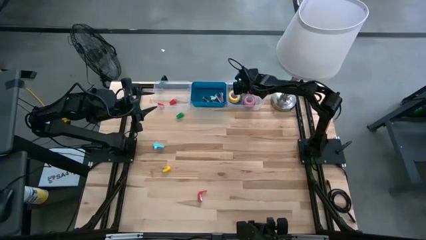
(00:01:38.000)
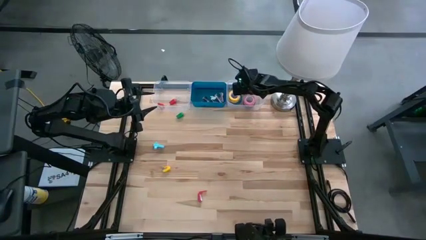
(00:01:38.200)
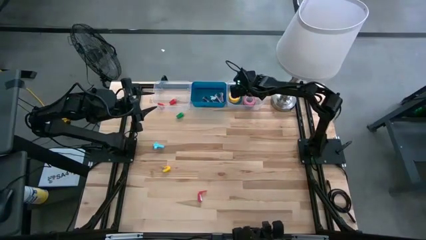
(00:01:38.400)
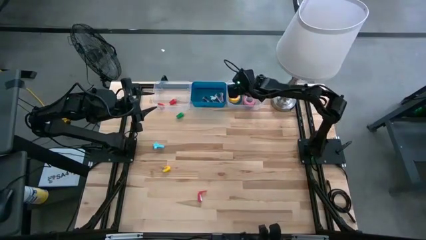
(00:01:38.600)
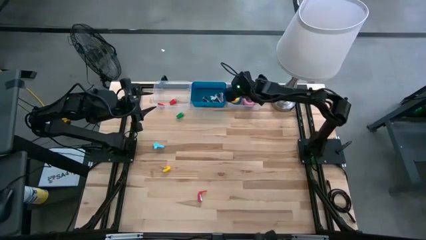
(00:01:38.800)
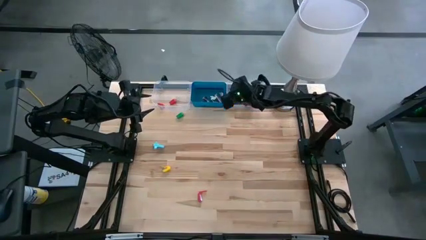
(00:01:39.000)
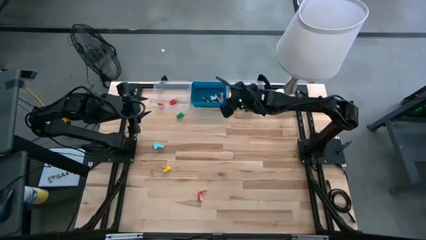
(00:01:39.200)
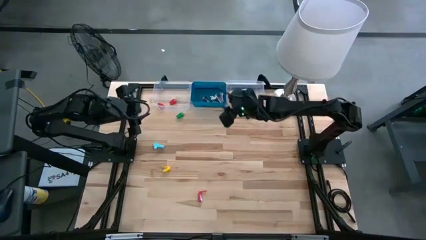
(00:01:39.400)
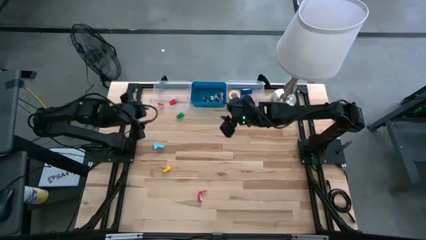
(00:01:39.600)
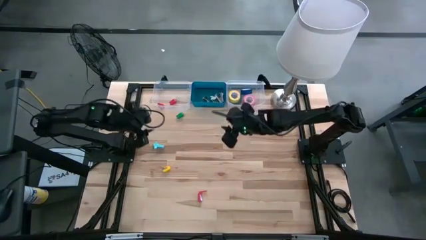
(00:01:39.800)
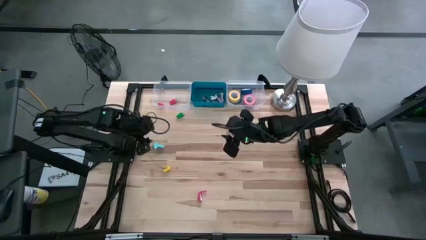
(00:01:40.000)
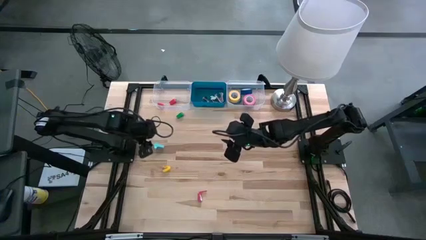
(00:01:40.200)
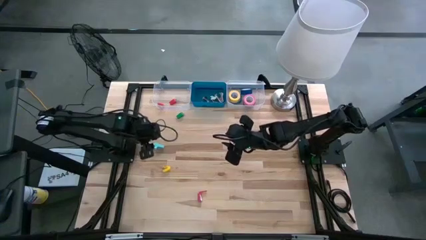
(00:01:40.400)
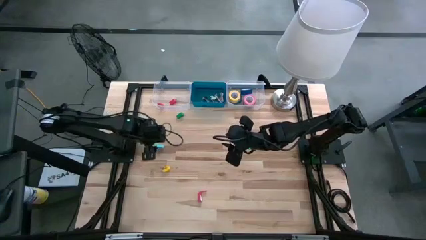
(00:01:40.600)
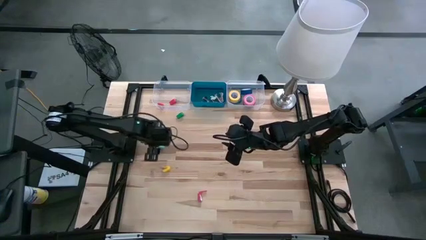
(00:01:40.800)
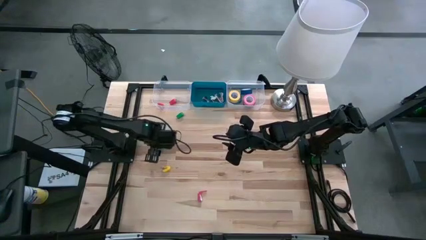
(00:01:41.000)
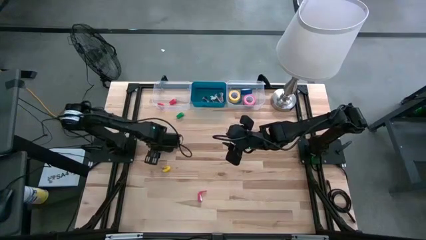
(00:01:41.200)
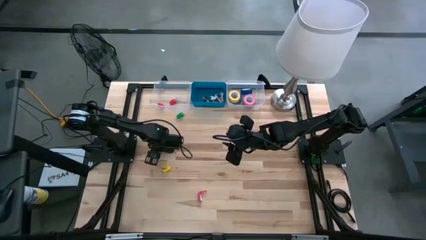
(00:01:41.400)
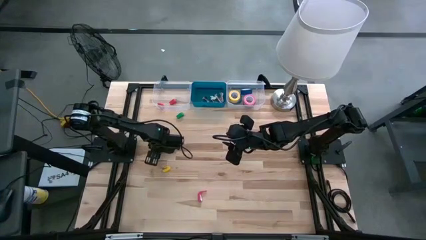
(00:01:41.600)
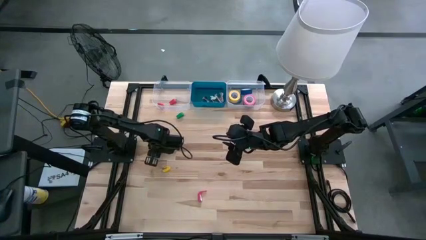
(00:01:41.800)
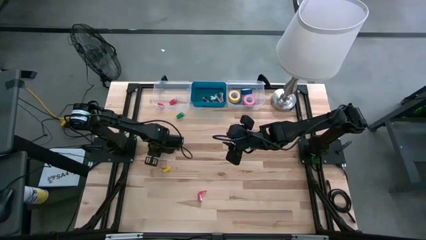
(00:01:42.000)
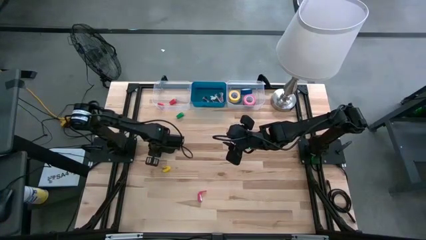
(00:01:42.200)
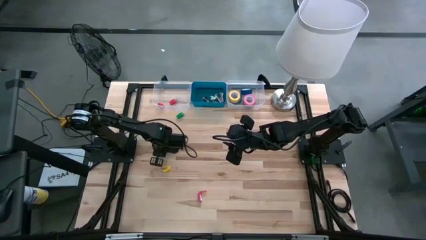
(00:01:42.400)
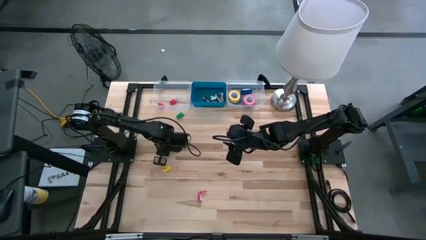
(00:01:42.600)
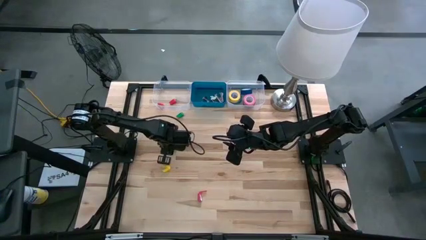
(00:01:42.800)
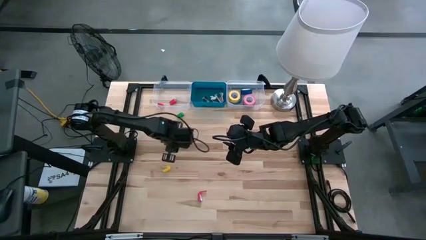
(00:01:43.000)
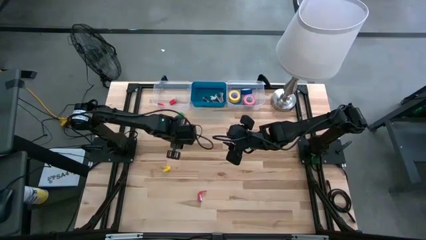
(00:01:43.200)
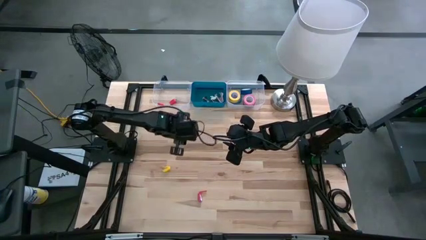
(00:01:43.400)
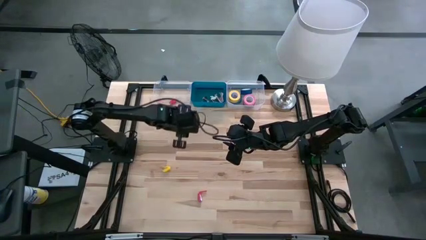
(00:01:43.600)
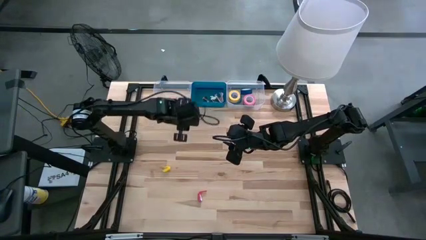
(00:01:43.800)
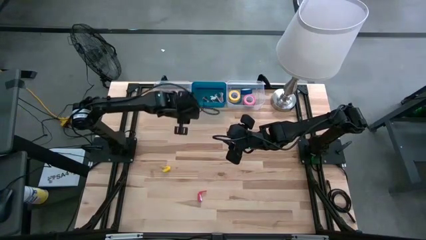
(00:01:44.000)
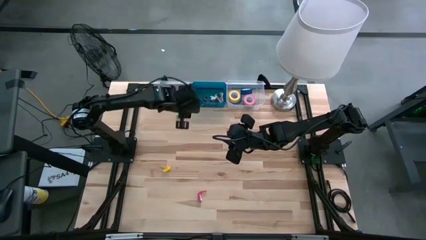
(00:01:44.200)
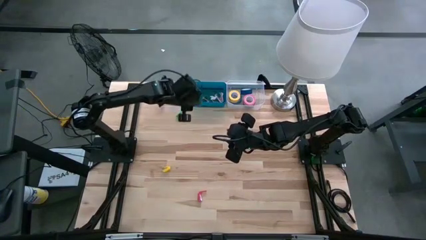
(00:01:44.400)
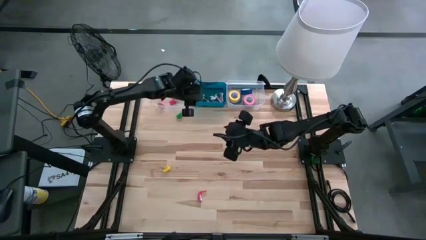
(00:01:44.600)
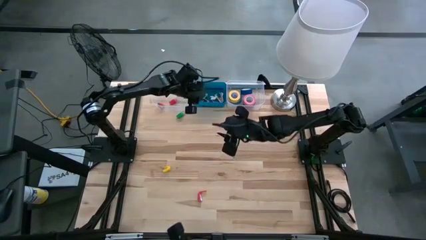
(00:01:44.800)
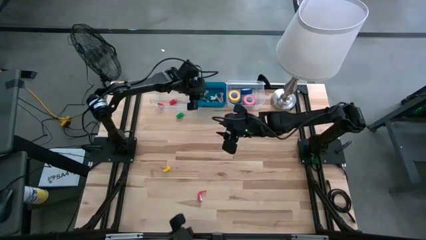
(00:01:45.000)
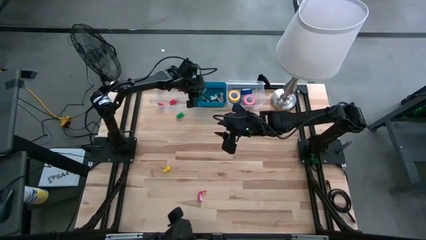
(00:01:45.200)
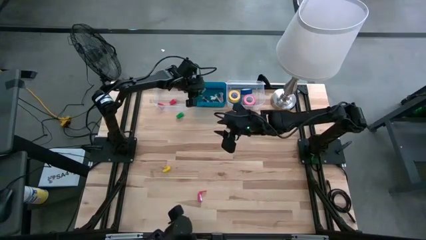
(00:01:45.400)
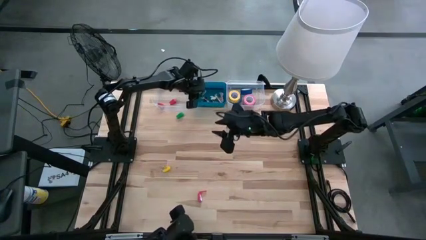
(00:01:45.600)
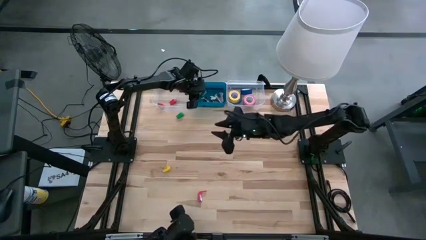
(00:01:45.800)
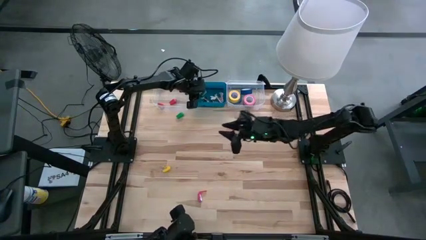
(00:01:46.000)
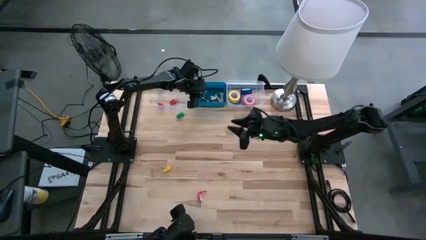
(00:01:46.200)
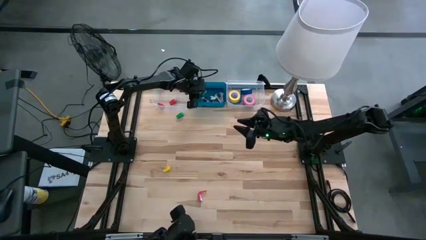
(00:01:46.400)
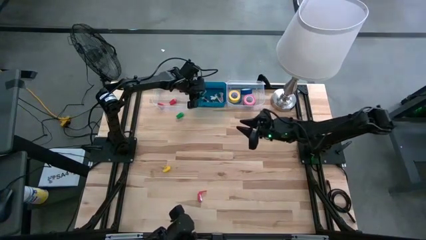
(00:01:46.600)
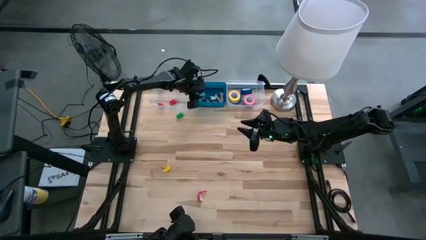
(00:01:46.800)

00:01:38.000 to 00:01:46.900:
Task: Pick and place Stapler, Stapler remover, tape
Put the light blue staple remover into the blue bin

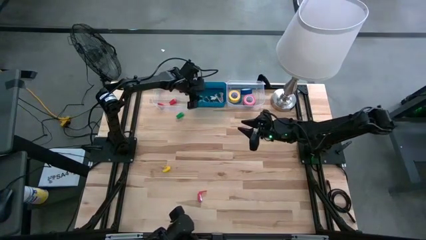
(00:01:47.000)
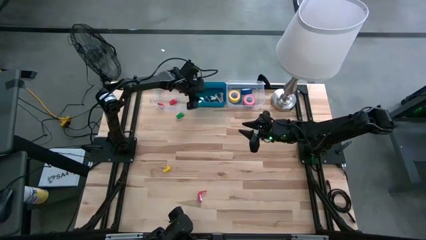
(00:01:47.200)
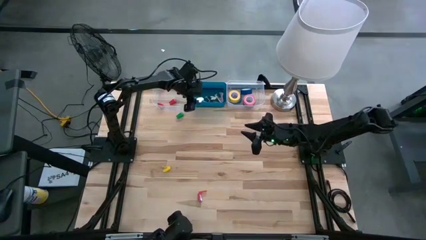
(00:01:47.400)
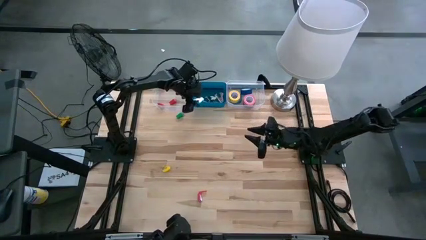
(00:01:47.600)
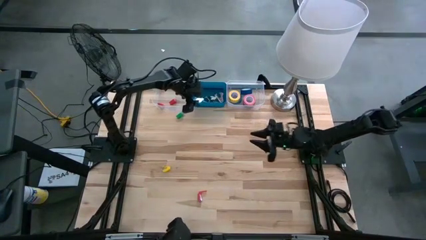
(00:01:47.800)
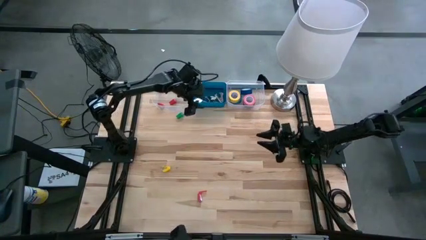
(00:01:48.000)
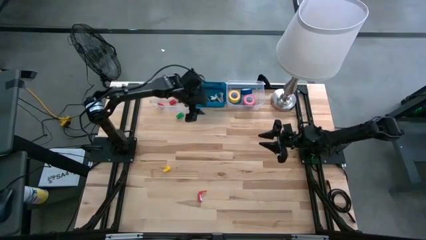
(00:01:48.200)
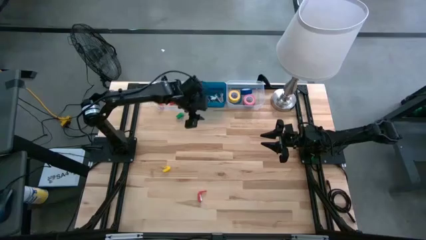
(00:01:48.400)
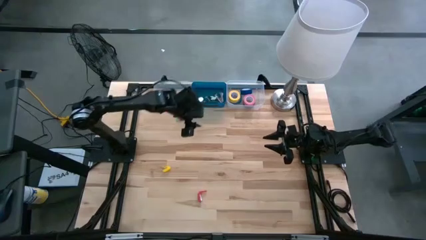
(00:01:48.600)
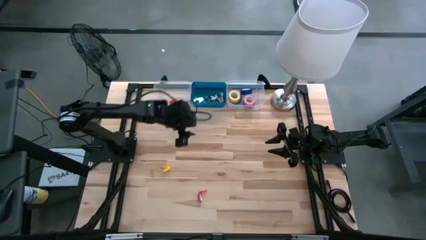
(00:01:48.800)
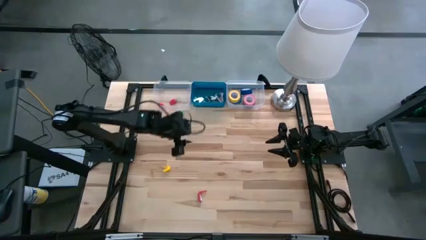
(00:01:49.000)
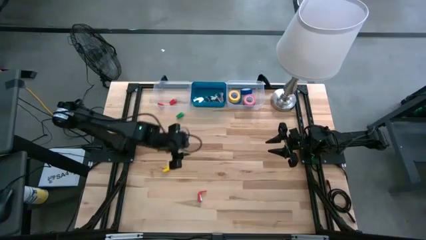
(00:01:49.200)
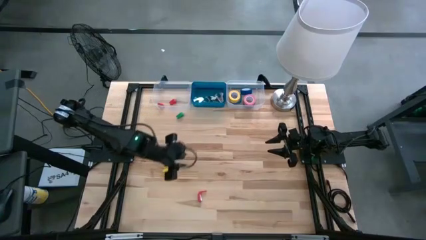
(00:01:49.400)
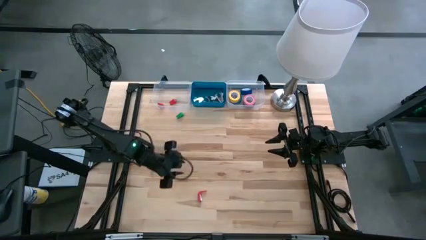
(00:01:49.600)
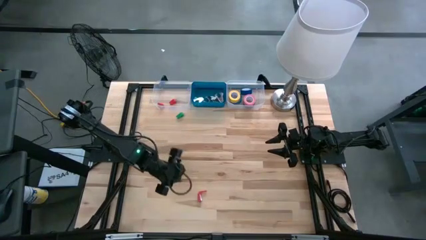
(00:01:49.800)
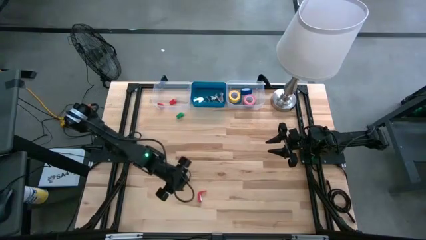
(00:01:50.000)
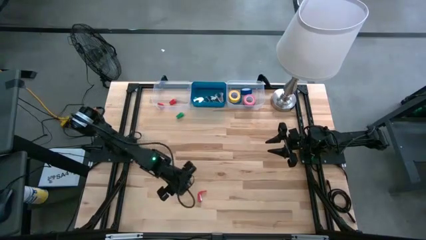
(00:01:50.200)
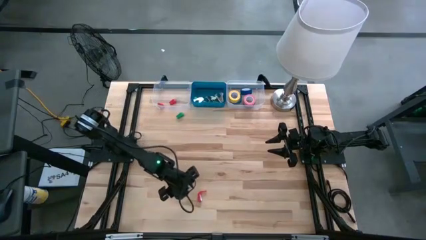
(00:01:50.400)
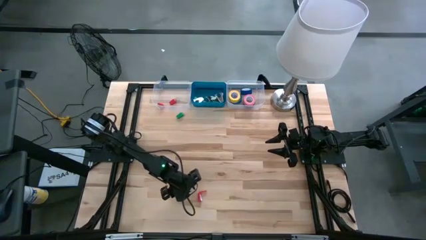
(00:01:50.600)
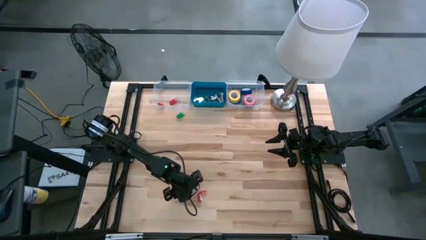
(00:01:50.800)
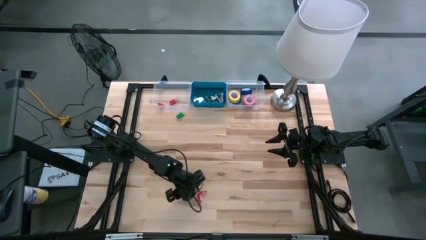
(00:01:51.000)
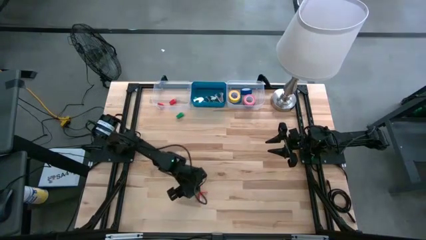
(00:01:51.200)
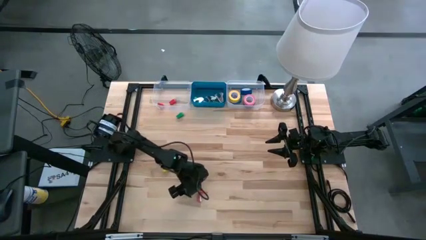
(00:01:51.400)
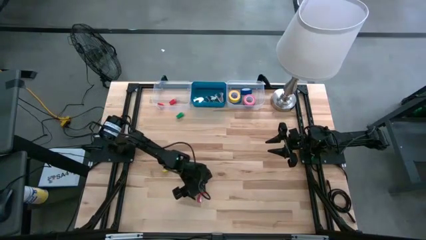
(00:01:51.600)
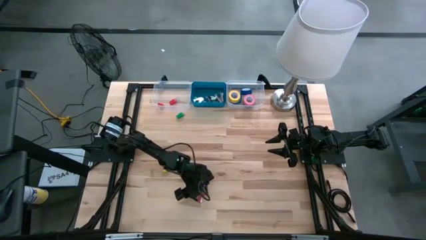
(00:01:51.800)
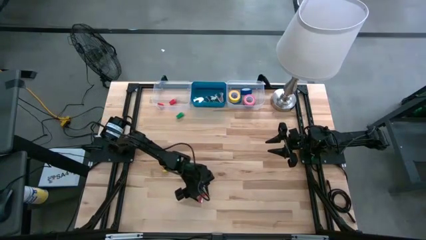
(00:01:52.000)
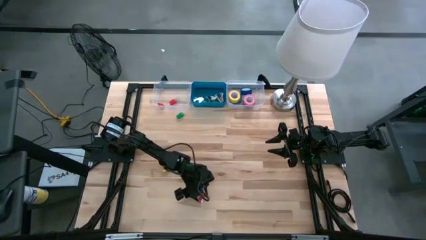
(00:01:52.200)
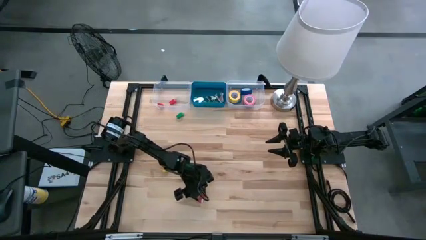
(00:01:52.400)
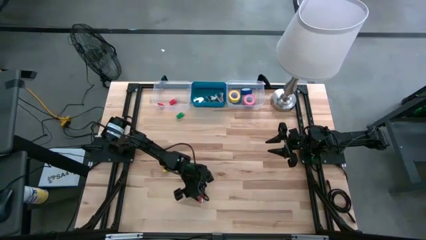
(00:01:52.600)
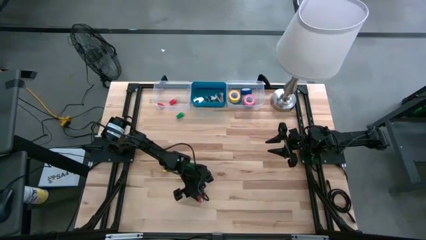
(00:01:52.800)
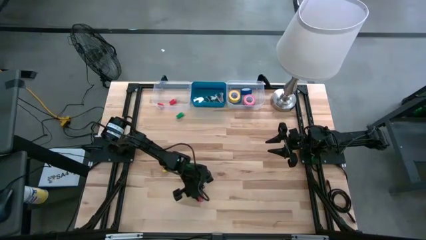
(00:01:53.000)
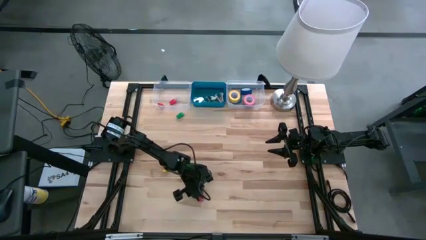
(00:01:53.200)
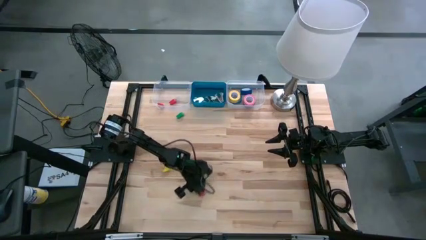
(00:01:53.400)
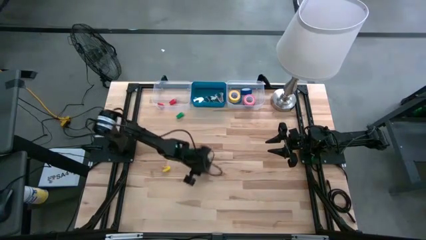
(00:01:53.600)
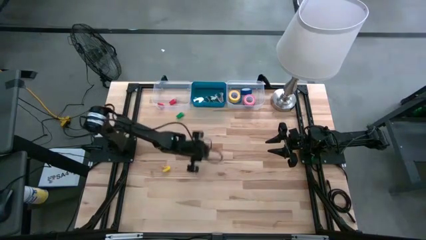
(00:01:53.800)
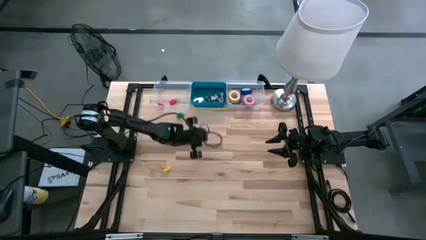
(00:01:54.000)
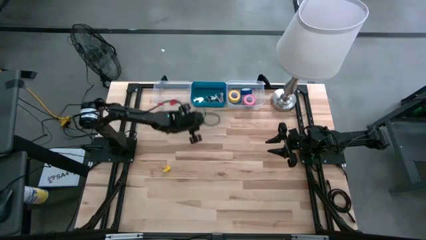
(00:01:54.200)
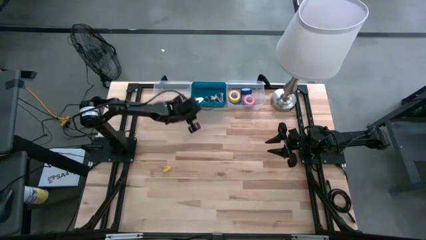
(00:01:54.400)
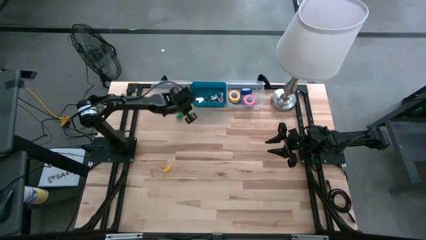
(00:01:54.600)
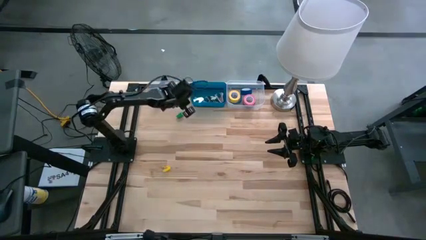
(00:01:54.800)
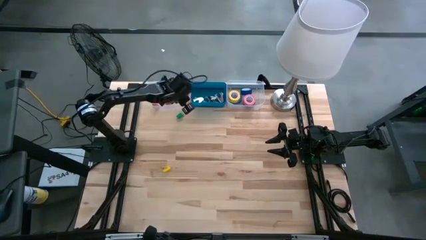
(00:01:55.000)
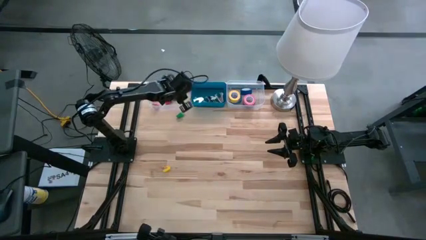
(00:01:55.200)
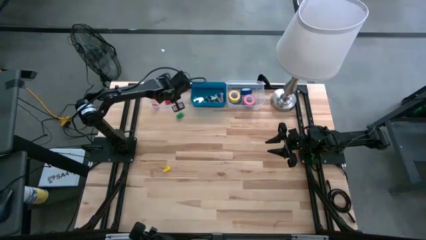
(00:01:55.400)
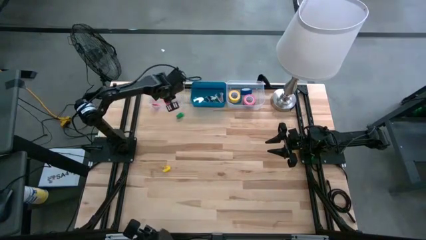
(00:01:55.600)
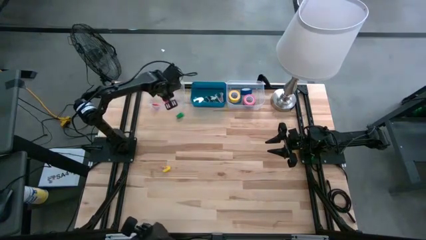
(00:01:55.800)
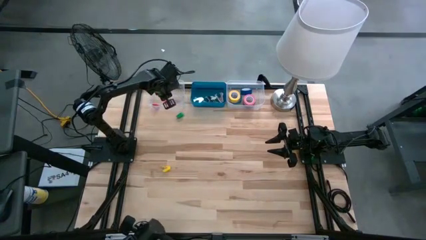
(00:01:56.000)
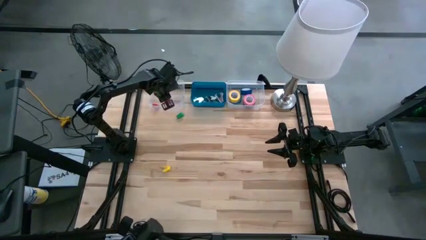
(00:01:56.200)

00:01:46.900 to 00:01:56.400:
Put the red stapler into the left transparent bin
